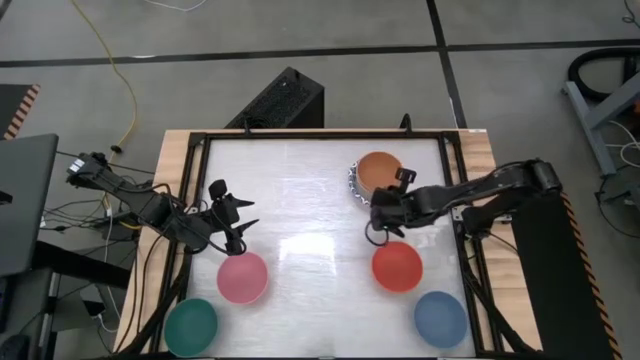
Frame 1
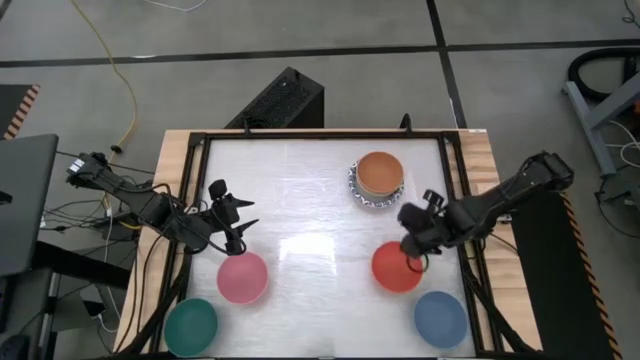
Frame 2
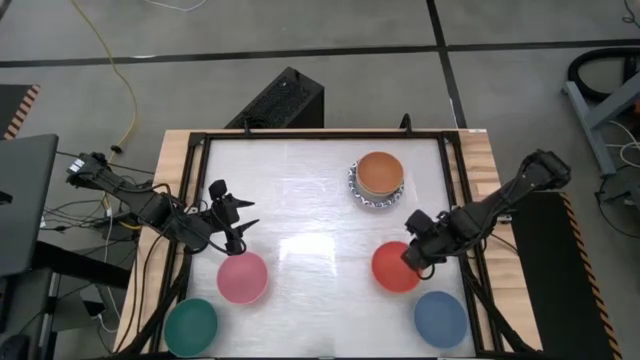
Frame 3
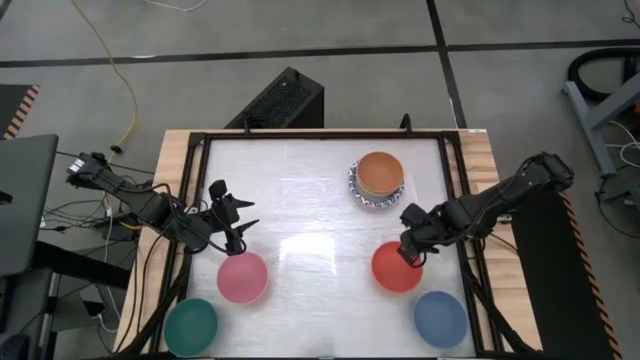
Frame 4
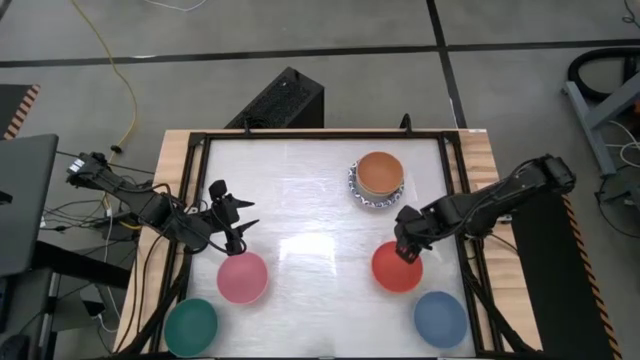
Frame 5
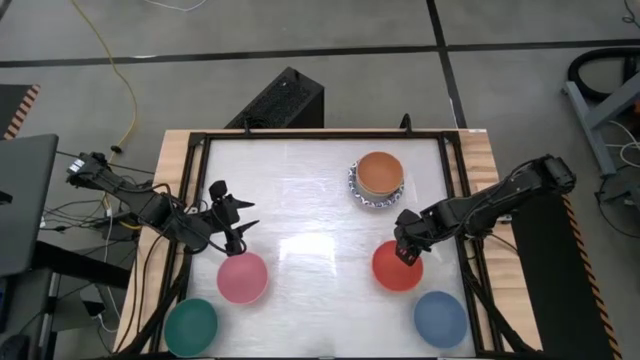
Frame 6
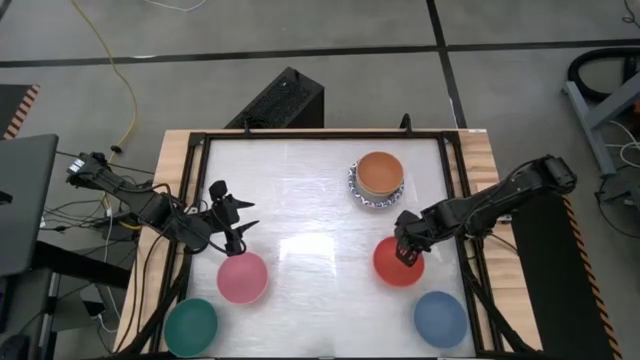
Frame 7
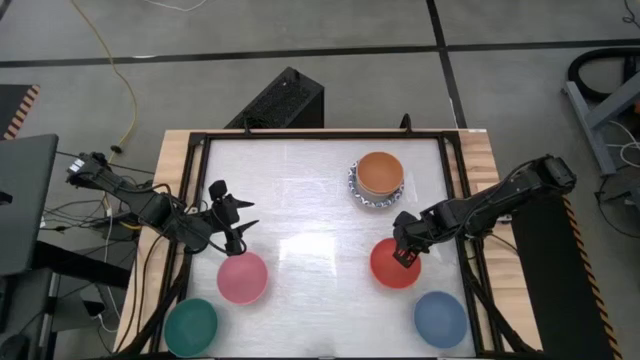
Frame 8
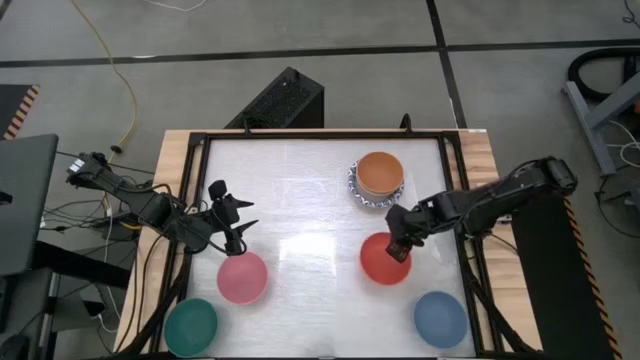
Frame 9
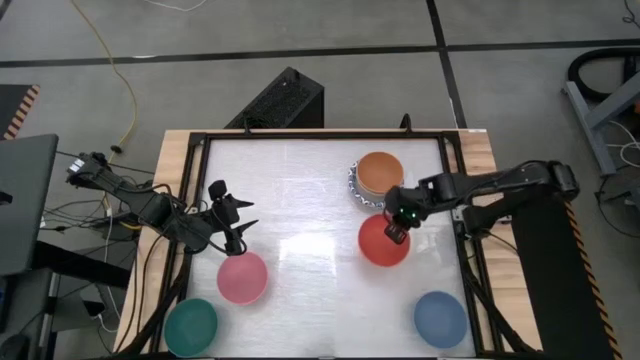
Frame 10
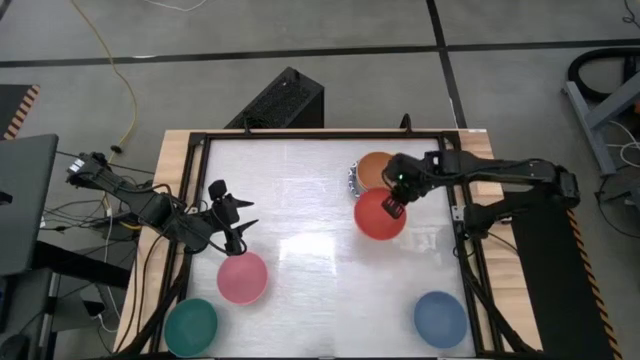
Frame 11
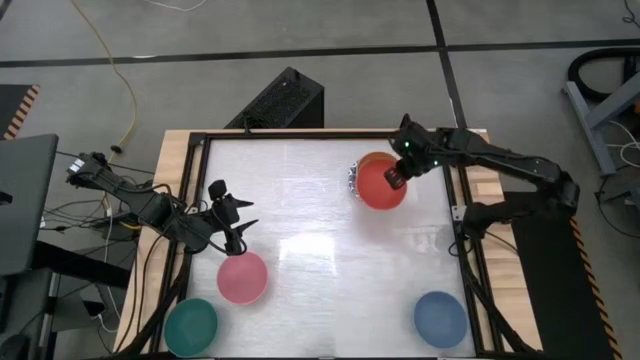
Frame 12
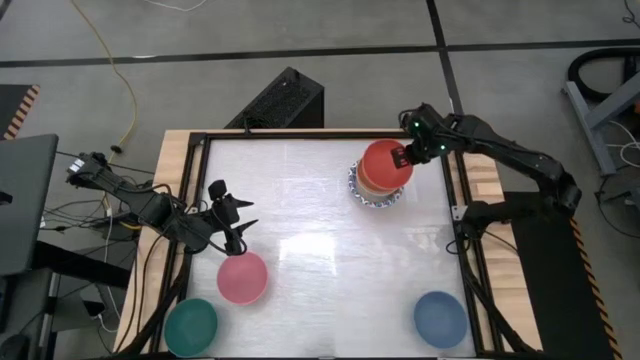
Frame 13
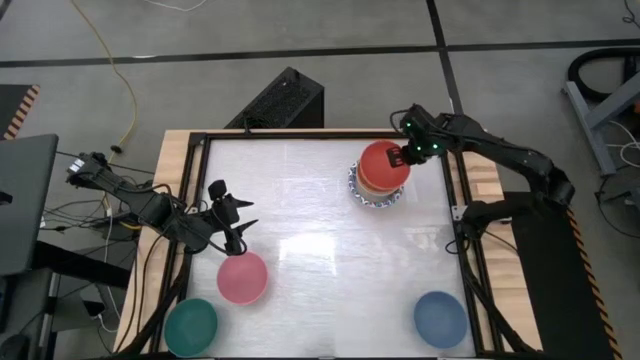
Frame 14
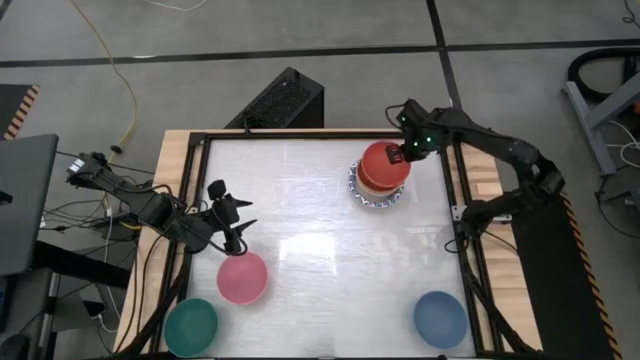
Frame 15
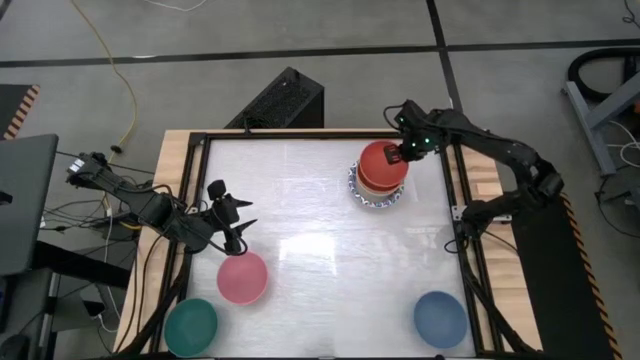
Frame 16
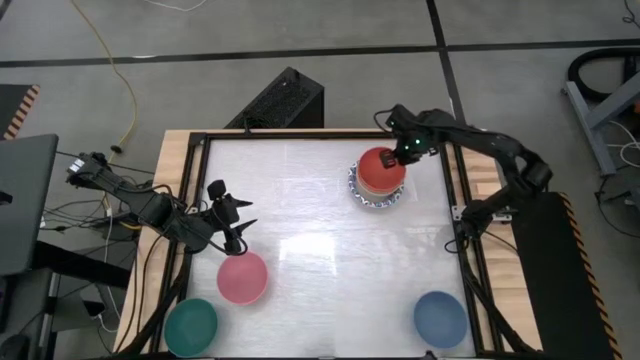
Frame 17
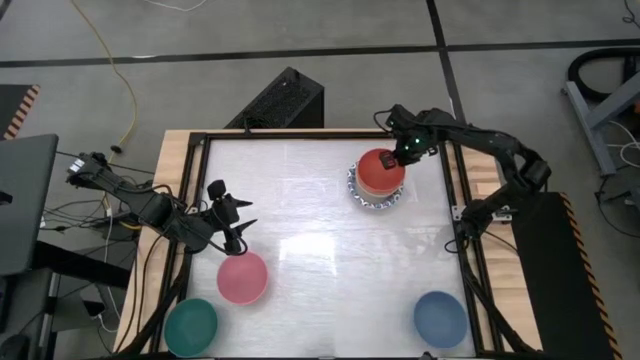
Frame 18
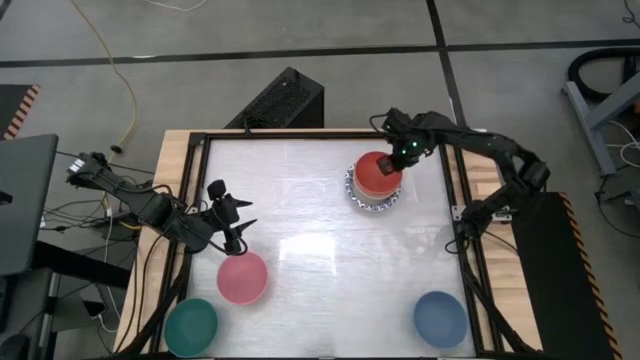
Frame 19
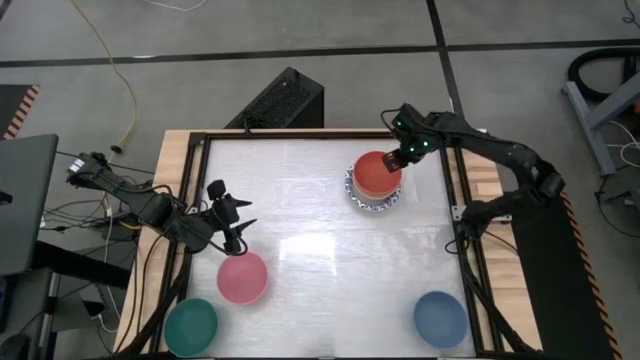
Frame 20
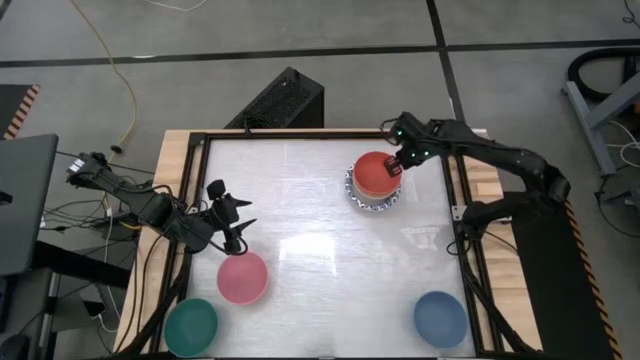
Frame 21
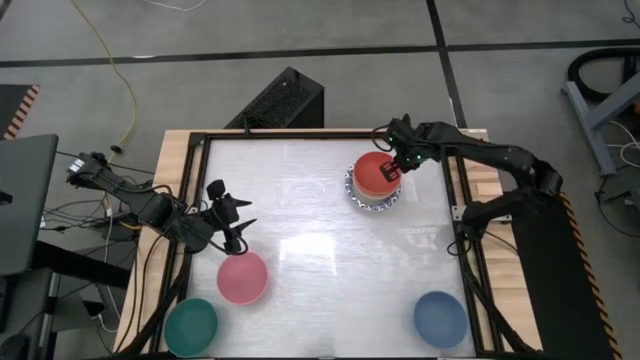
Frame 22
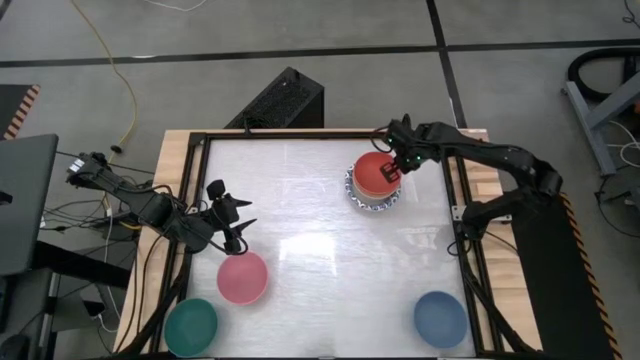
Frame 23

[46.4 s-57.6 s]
Stack the orange bowl on top of the light orange bowl
